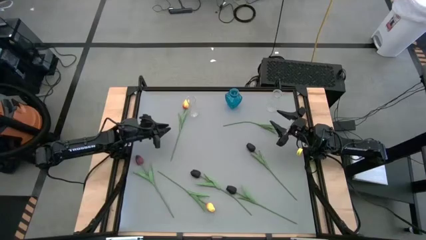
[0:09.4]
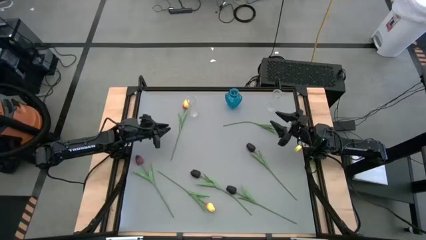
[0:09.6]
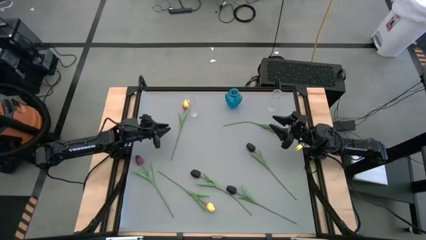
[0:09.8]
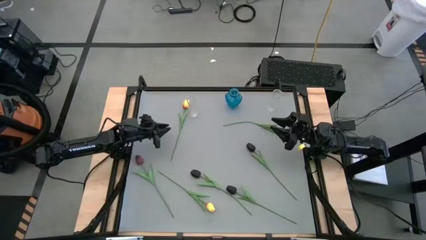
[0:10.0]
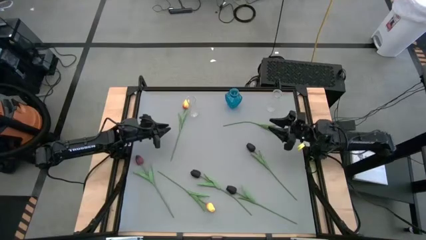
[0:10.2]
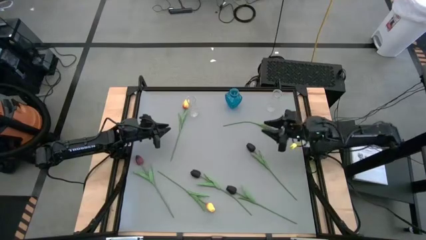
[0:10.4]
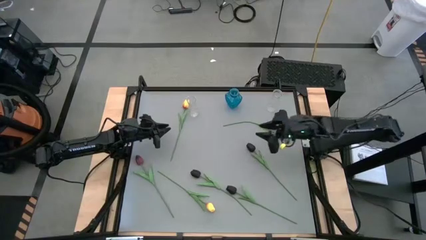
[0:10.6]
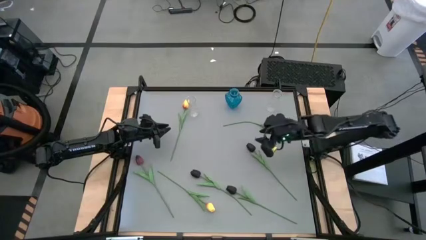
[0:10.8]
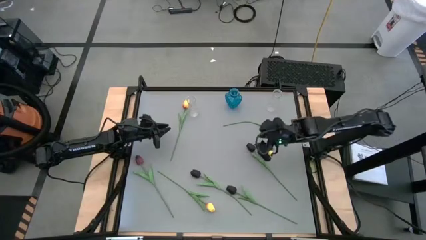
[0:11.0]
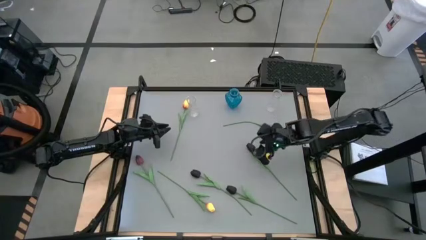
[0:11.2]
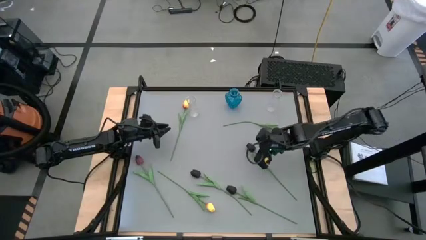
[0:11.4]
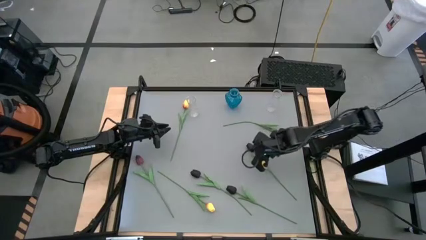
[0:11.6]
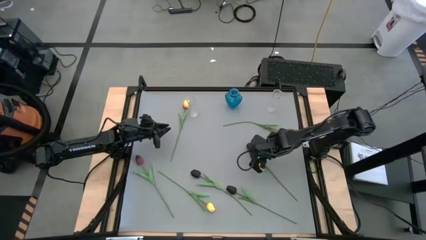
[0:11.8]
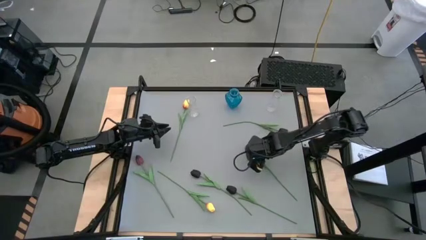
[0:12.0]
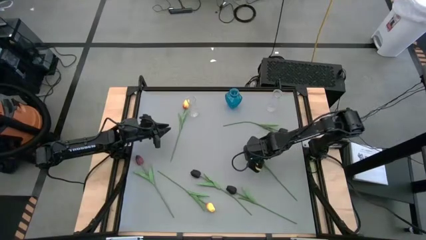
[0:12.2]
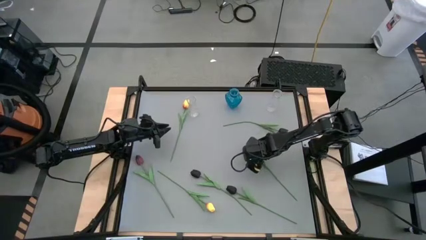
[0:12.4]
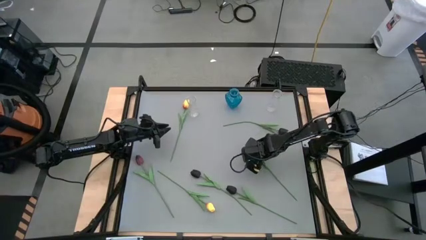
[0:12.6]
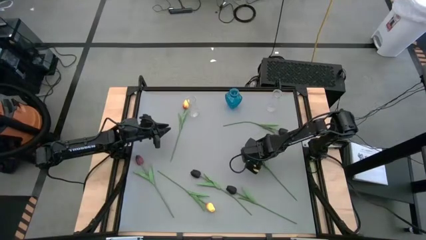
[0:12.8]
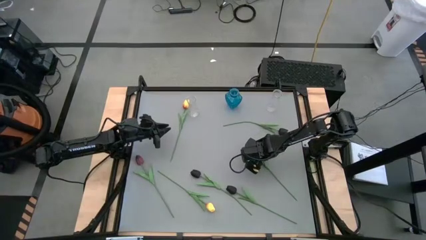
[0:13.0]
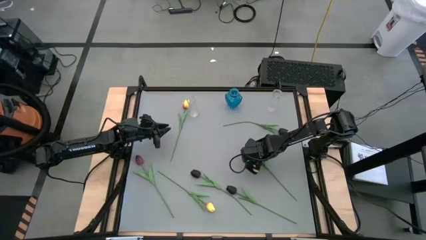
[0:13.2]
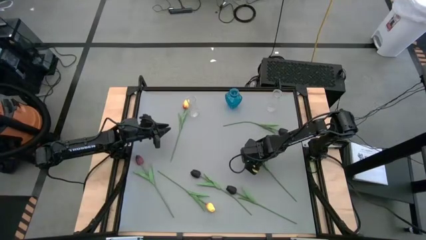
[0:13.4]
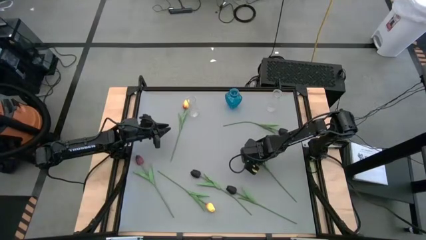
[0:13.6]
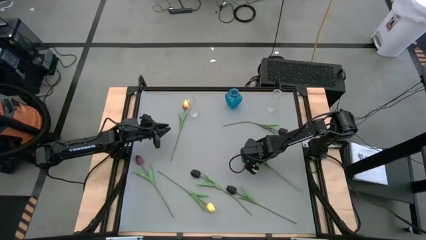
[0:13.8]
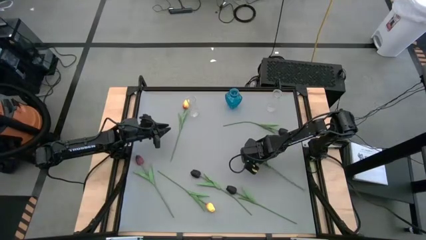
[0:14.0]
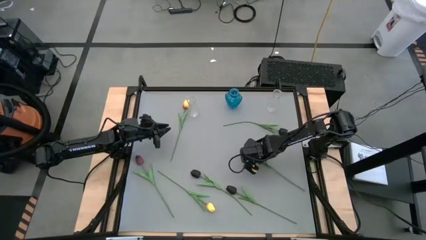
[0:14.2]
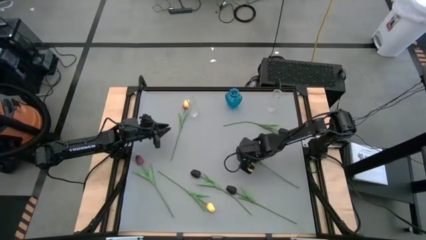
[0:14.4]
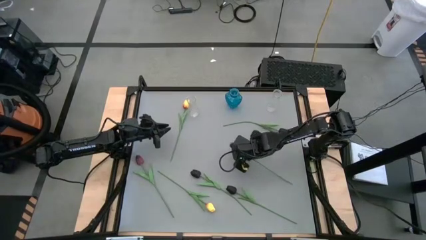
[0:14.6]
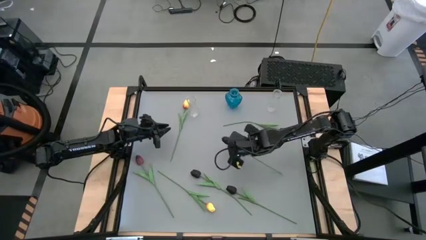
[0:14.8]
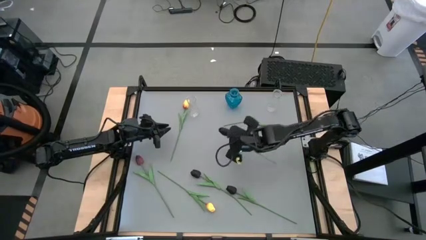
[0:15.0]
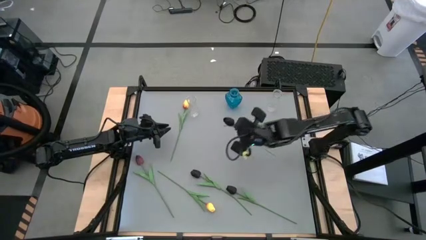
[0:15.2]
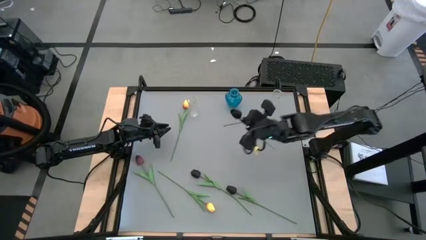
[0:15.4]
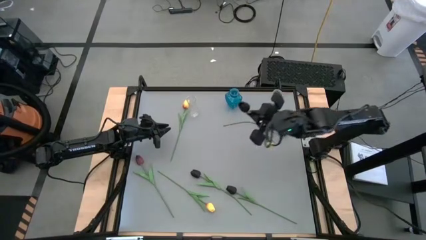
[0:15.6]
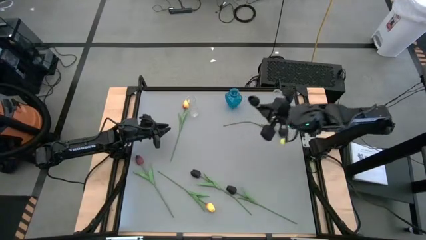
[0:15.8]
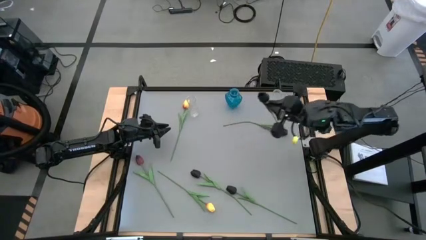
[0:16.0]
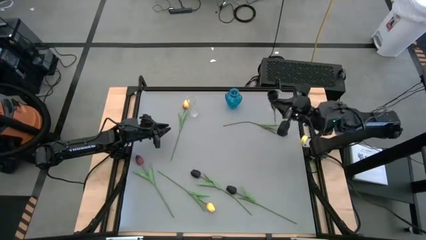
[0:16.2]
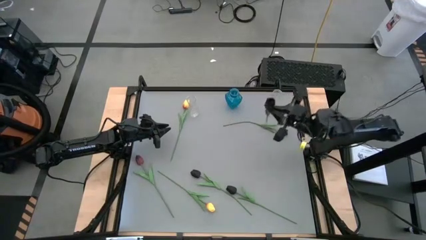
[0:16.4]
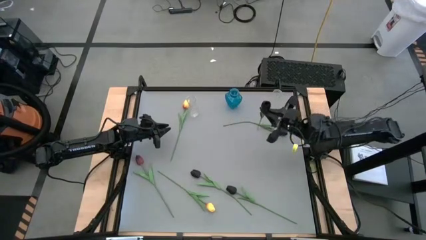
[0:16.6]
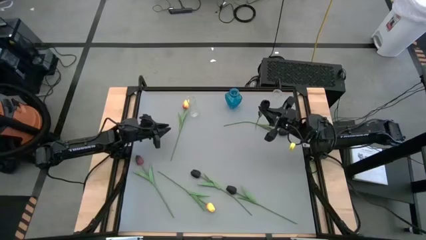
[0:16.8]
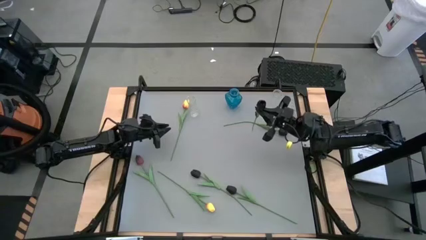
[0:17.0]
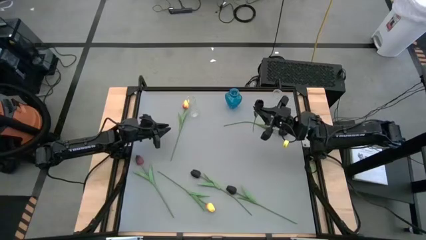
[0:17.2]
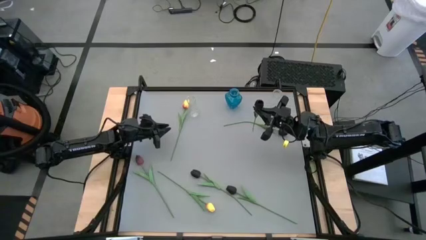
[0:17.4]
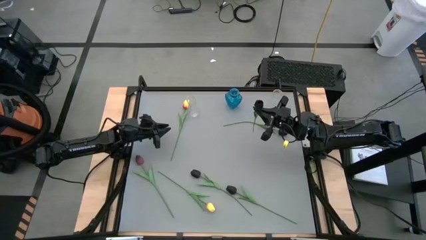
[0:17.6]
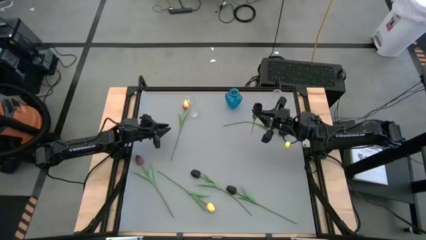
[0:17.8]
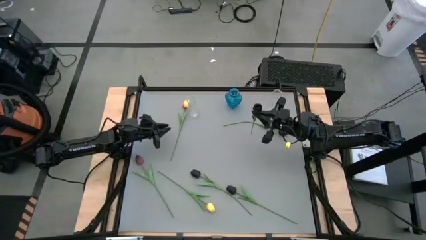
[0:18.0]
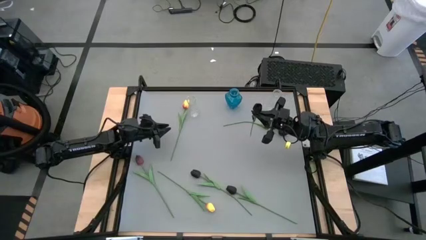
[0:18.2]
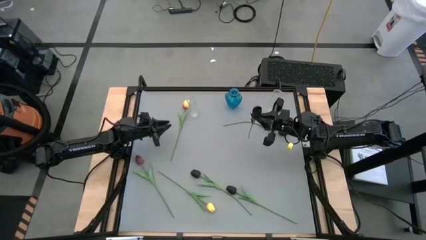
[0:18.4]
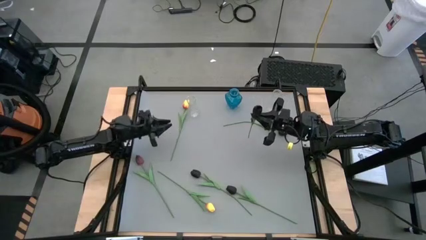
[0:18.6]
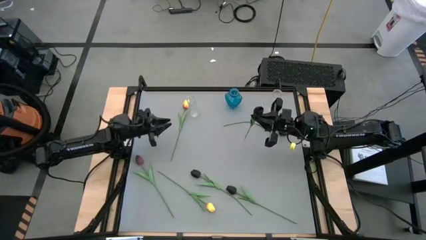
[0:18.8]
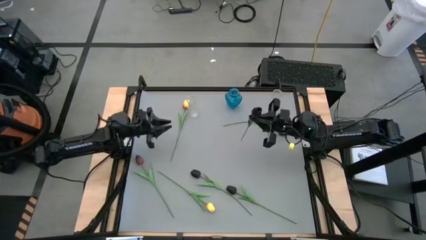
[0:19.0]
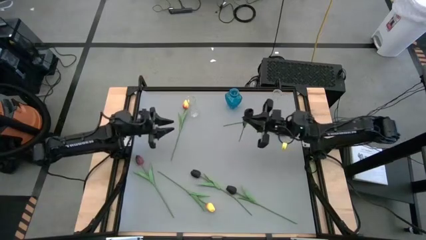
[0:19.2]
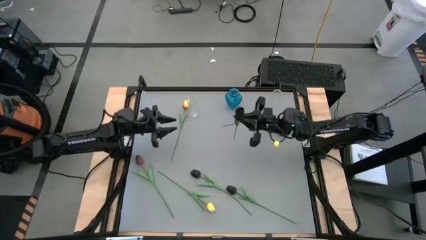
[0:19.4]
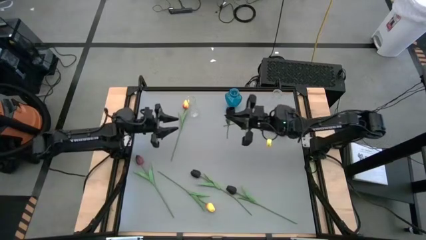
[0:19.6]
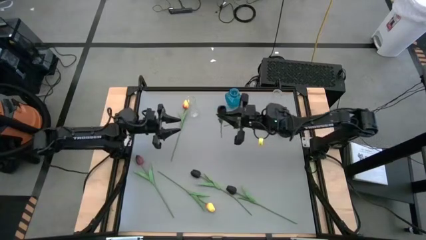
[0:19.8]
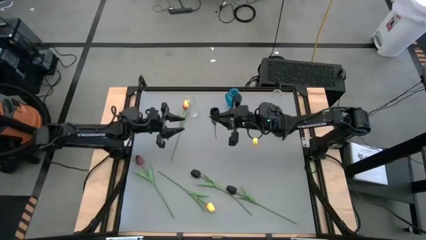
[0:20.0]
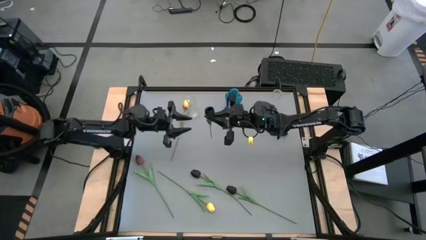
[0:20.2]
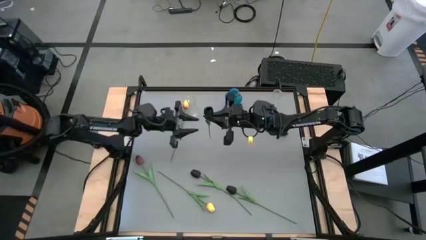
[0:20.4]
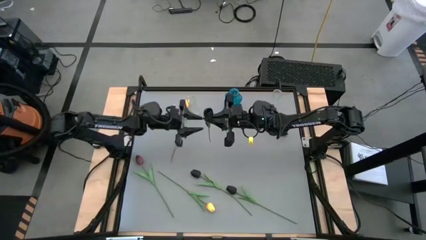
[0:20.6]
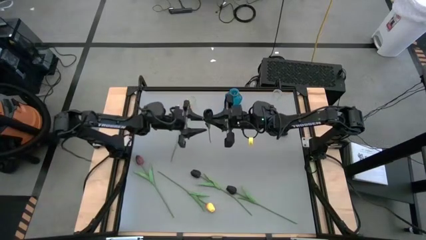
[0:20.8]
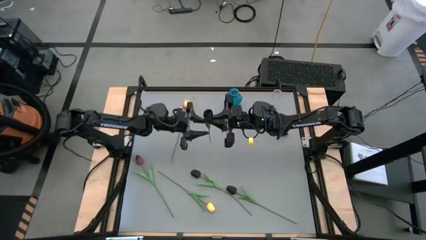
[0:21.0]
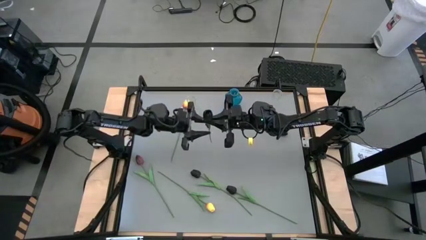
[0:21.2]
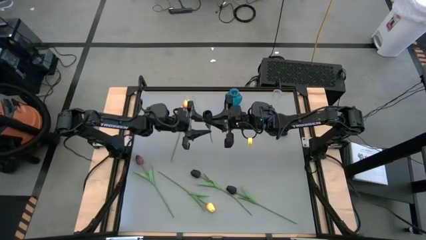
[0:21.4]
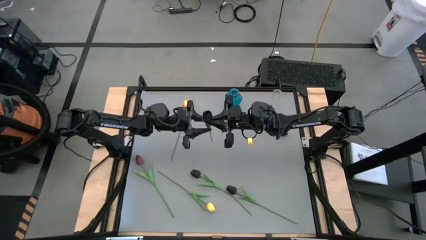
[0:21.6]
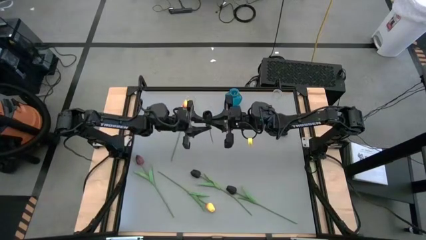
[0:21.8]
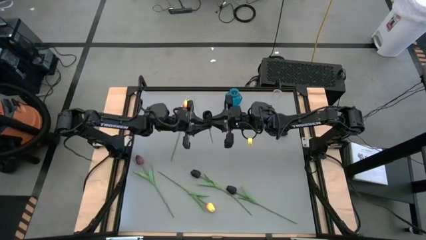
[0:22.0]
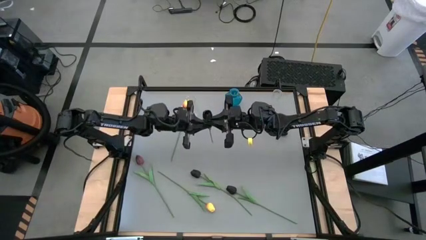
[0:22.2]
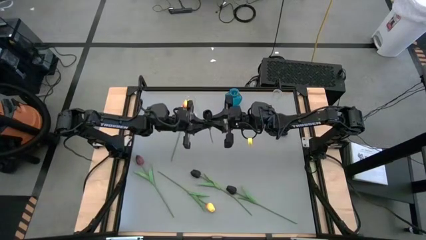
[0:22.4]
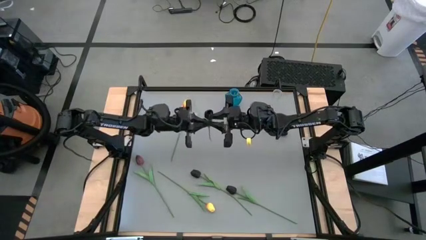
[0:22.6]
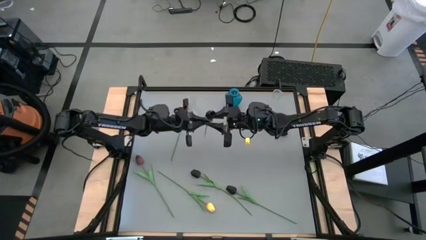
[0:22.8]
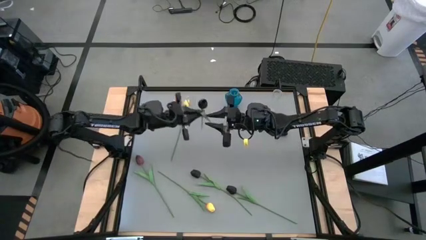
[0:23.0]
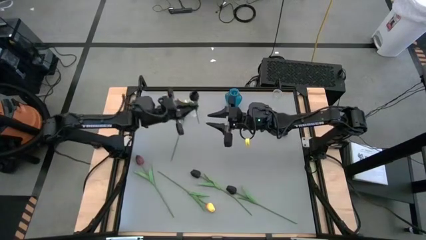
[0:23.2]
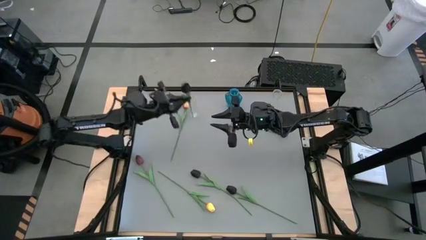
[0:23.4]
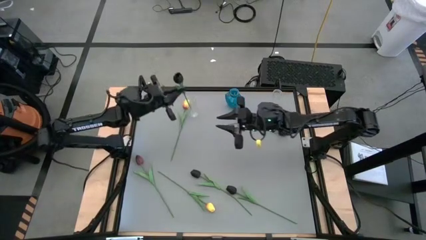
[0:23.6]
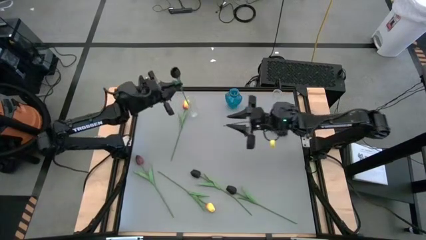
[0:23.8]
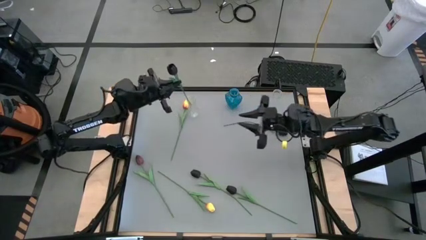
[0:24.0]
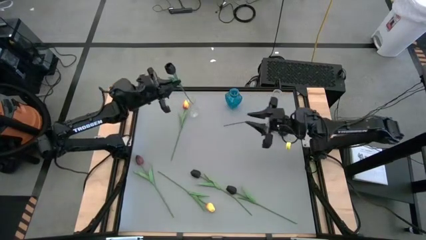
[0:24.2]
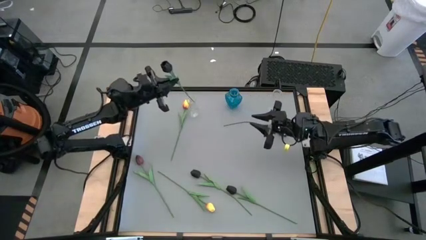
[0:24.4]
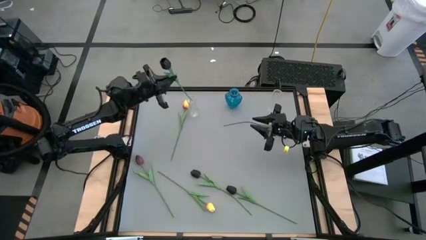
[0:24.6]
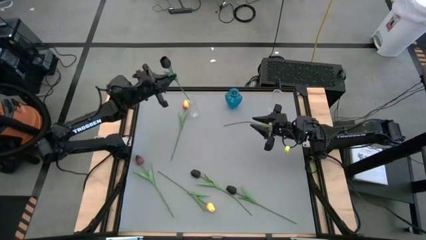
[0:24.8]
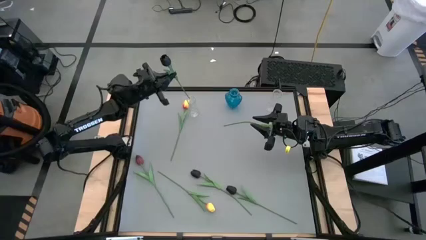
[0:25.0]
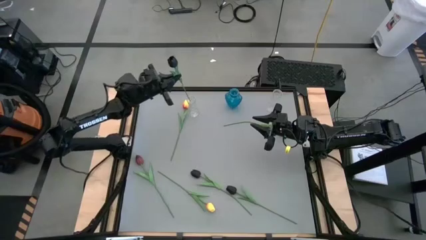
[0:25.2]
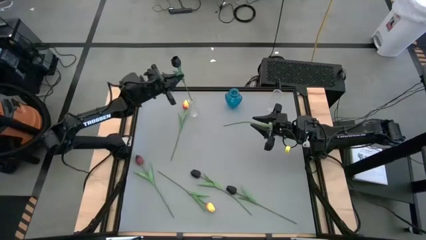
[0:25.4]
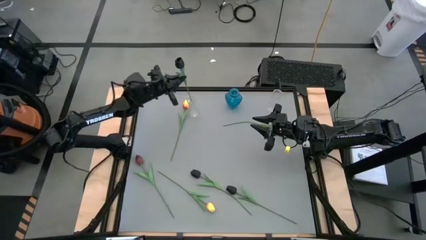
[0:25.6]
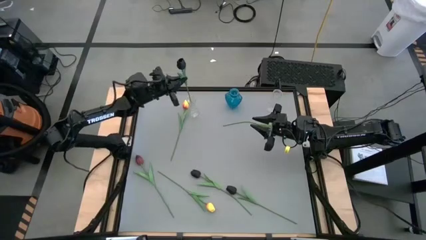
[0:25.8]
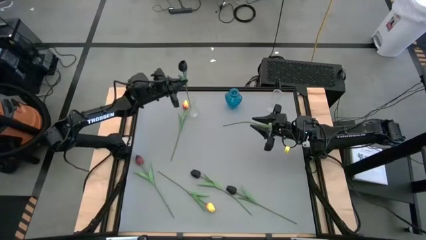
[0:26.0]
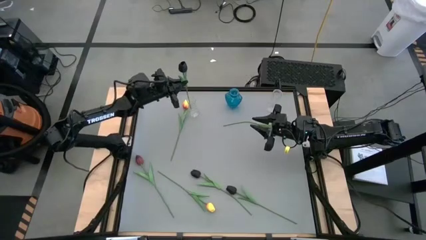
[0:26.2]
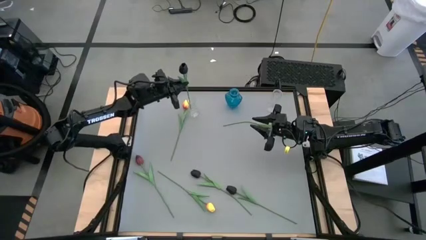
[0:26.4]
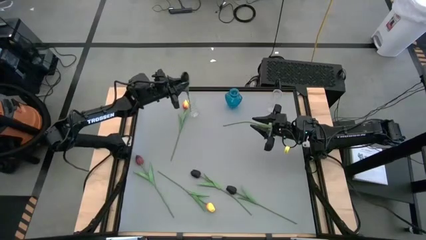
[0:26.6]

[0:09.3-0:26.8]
Task: Sort flowers into vase by color
Put the black flower into the left transparent flower vase
